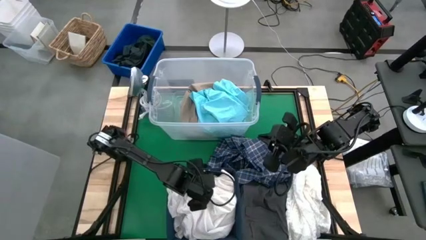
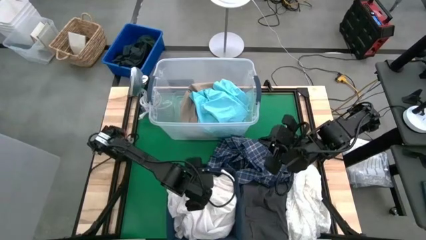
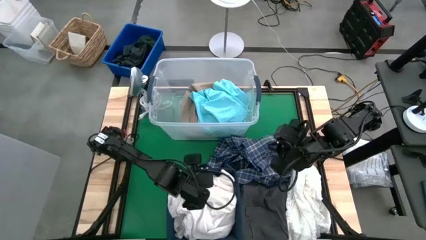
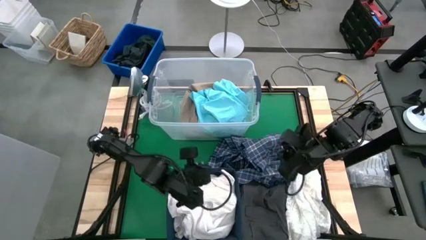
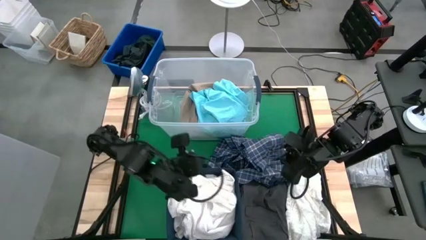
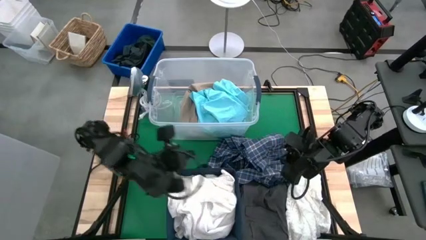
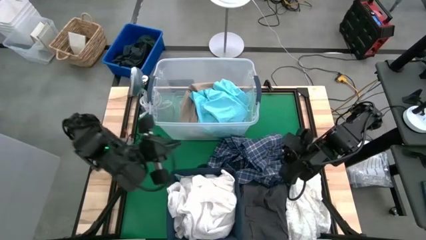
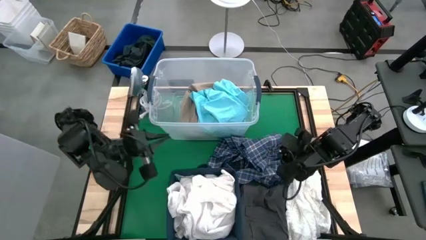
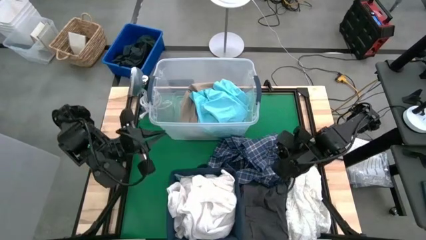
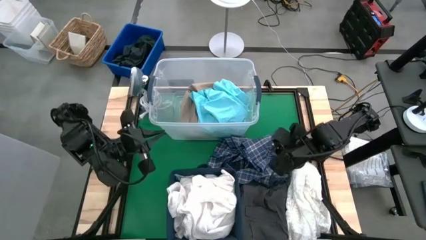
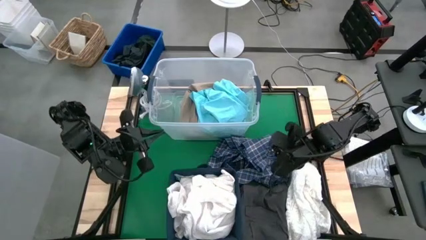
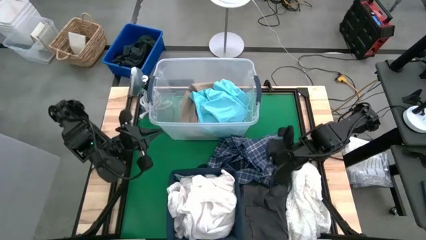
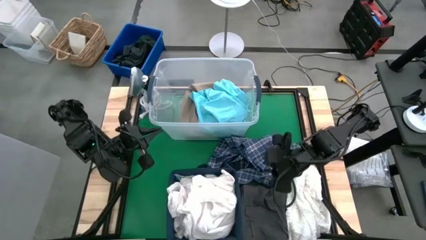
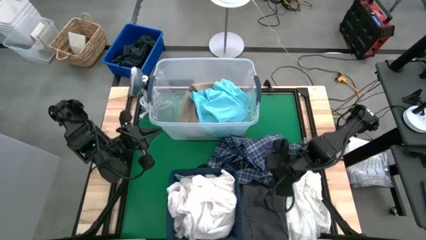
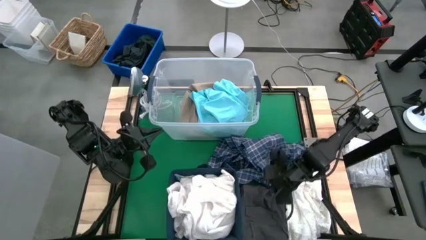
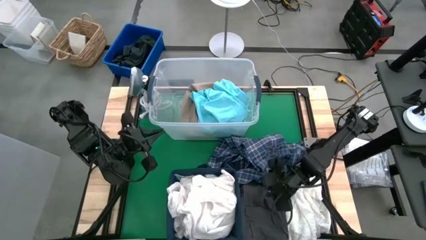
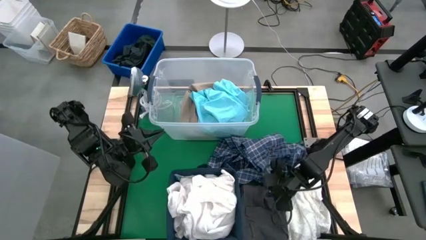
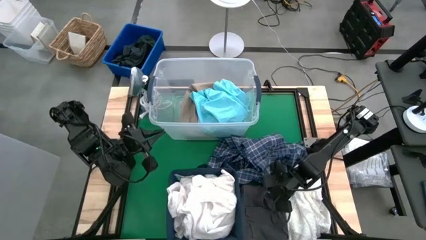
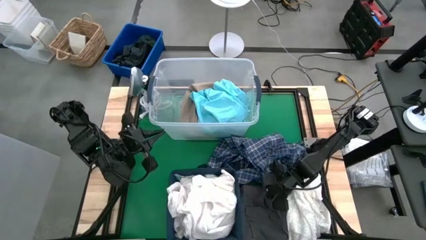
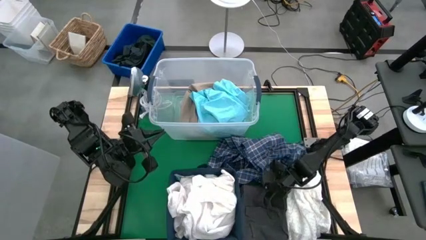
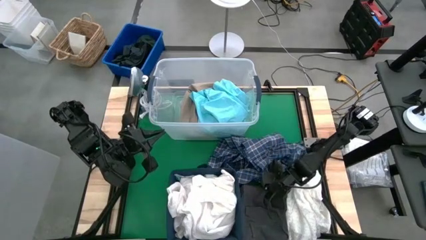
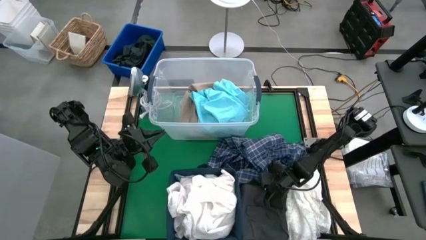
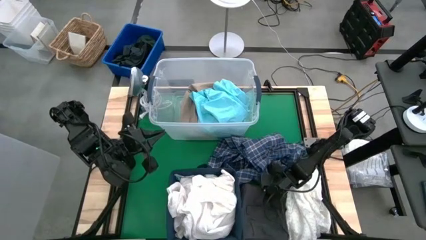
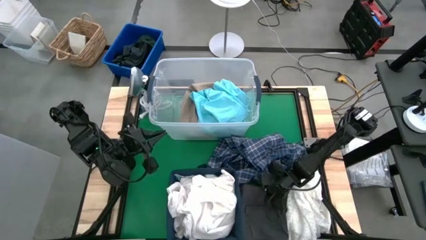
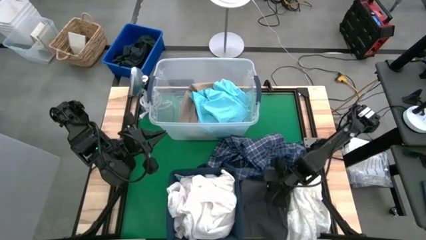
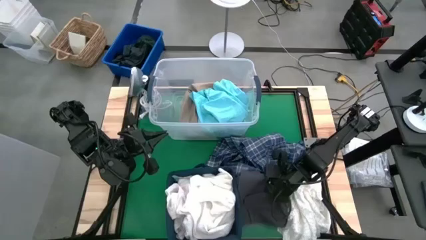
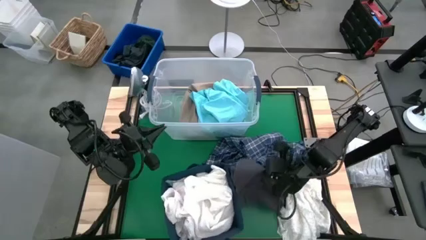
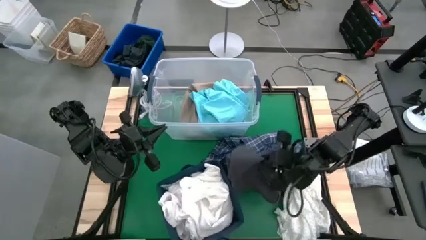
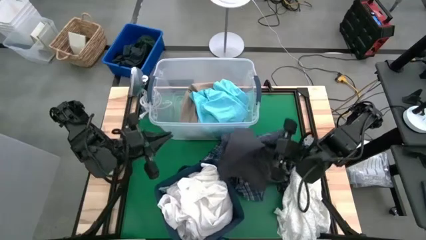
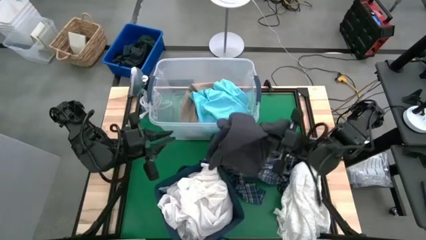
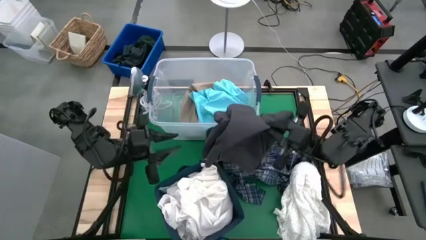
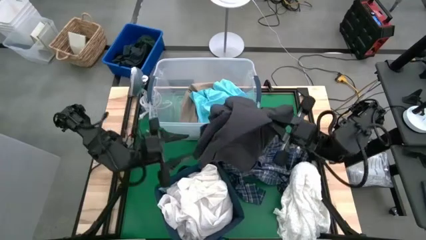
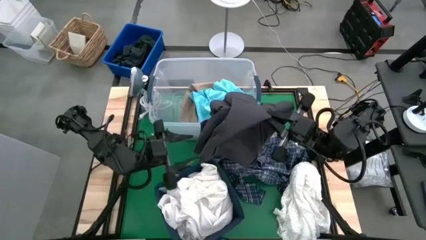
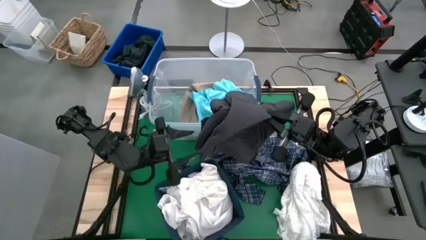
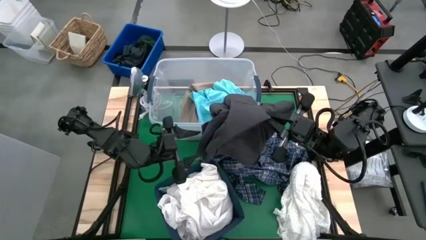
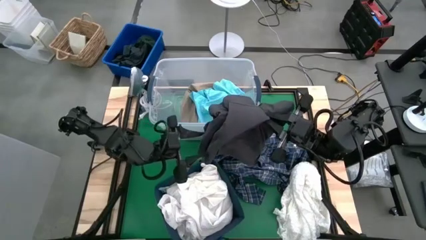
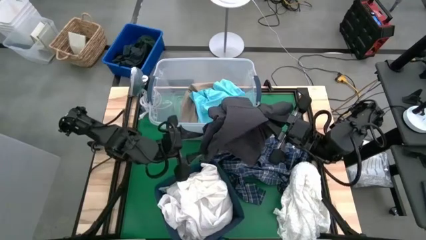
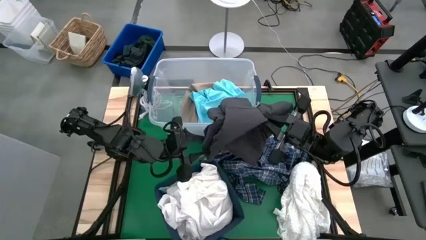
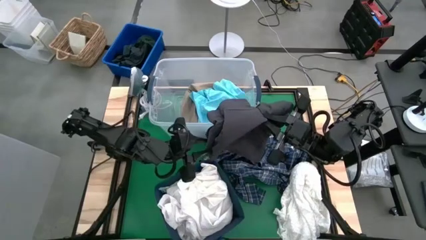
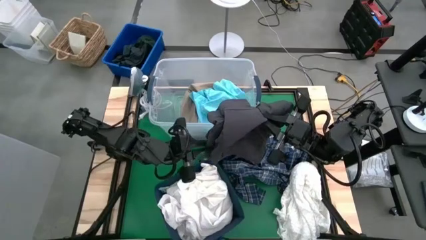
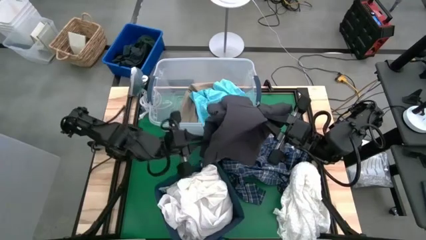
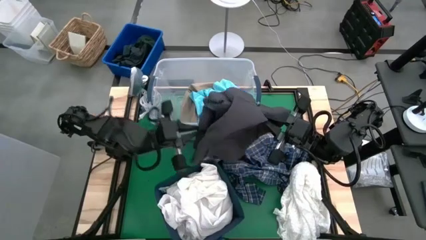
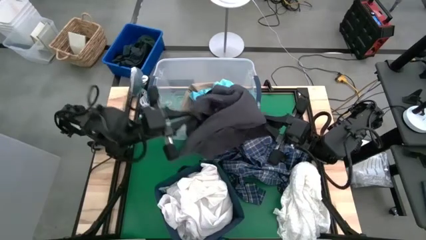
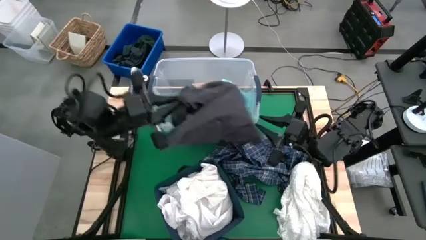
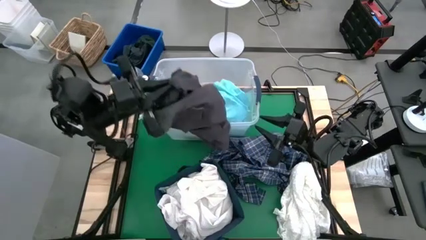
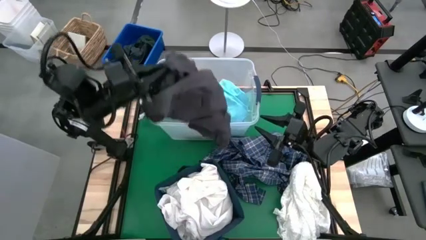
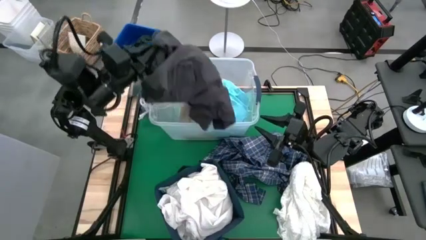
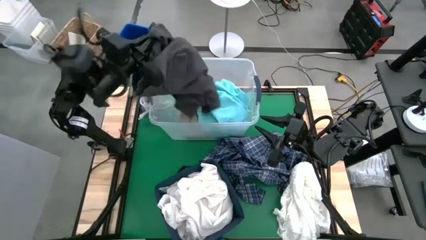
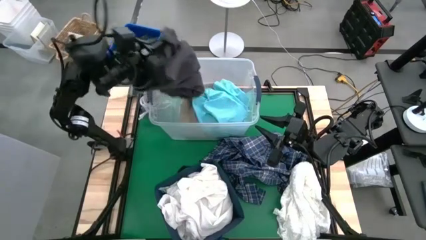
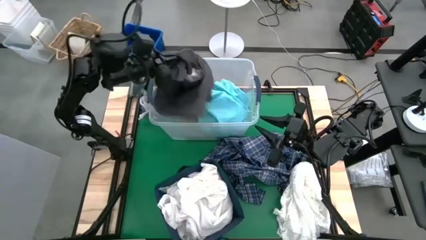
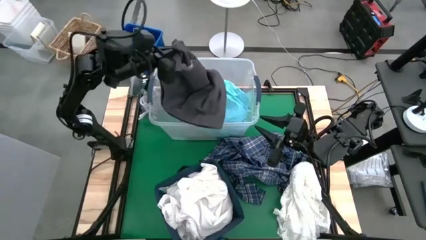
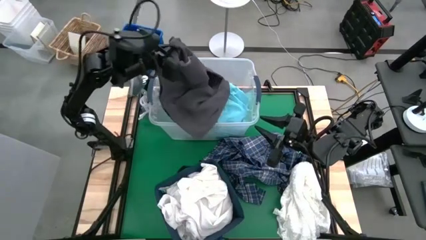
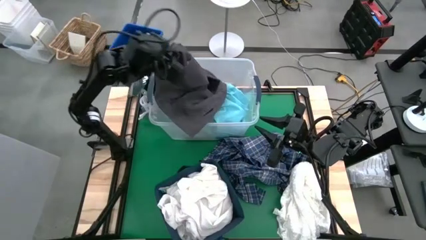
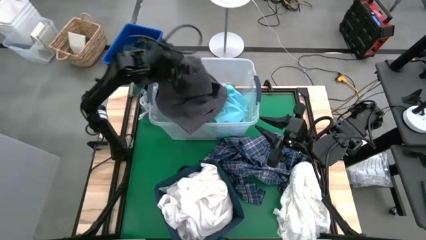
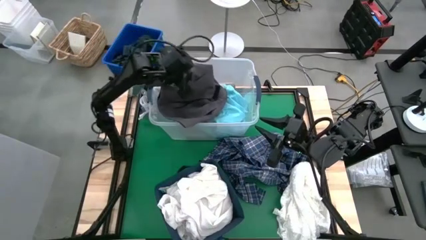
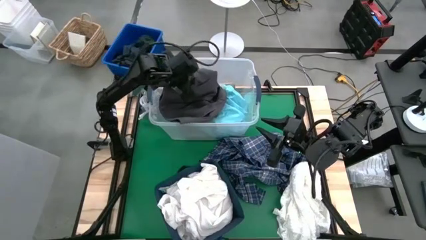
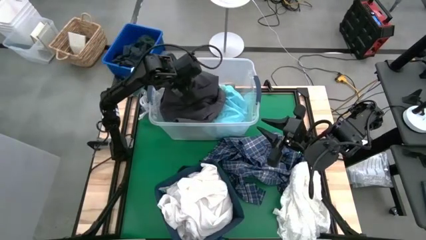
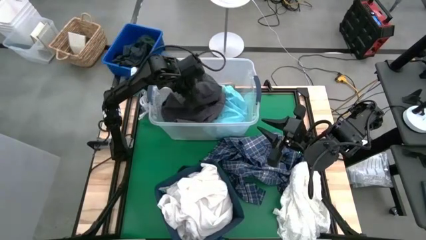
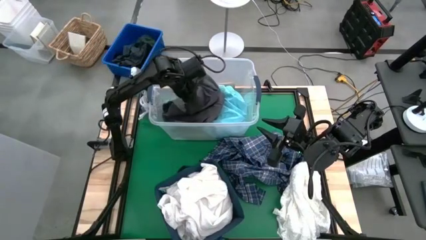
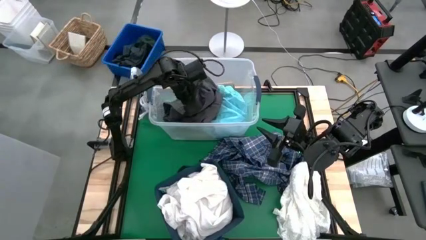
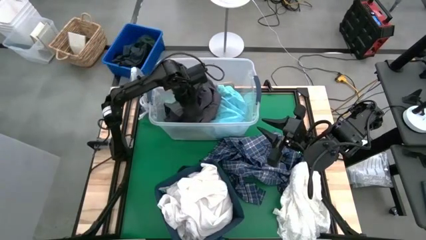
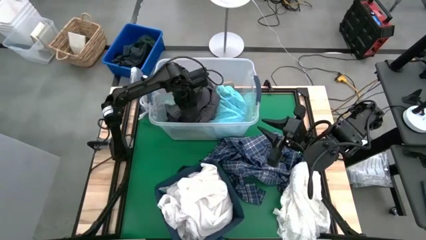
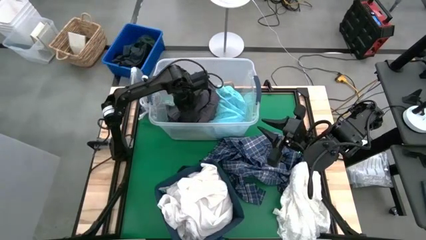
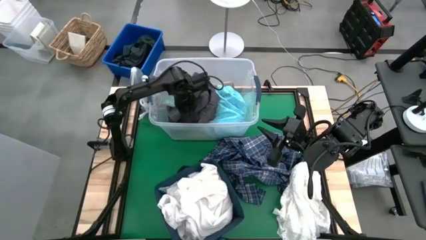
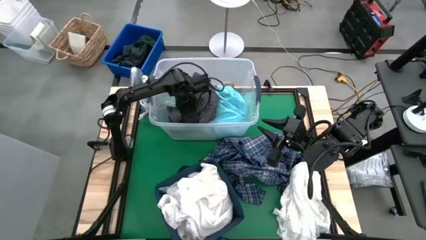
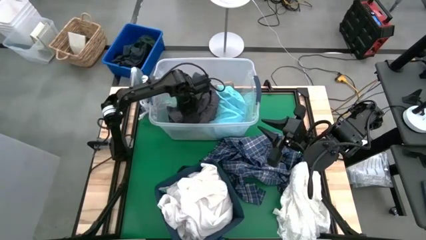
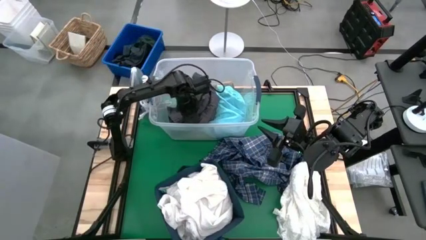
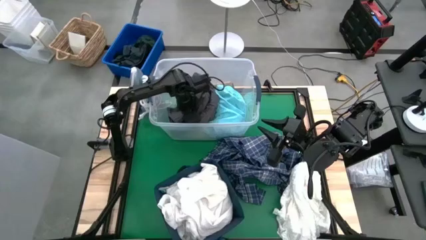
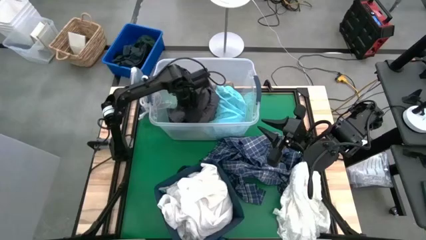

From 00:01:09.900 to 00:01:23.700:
Task: Sort clothes
Put the gray shorts into the transparent laundry bin

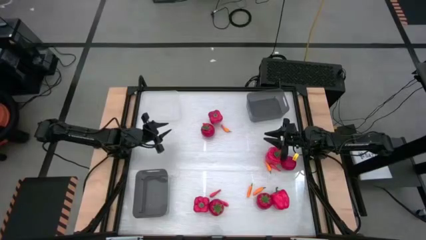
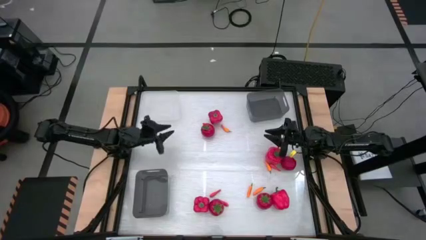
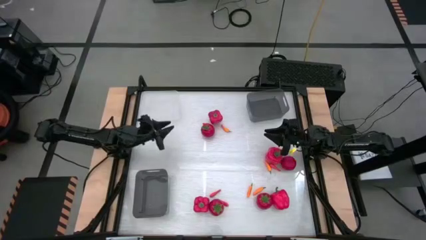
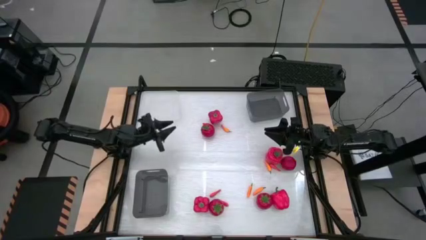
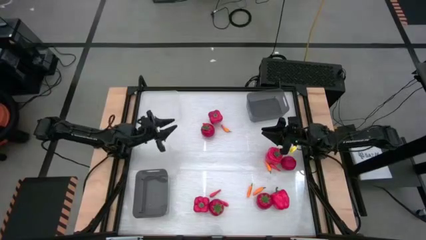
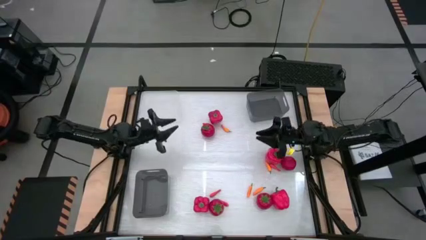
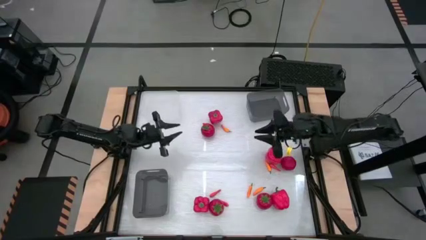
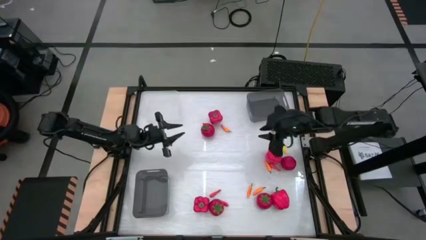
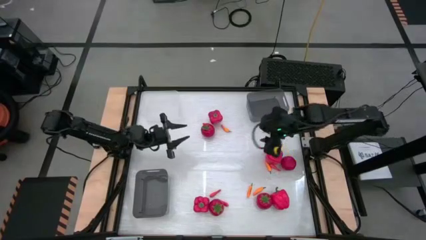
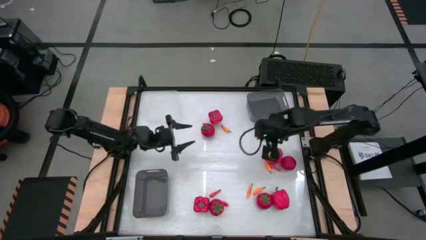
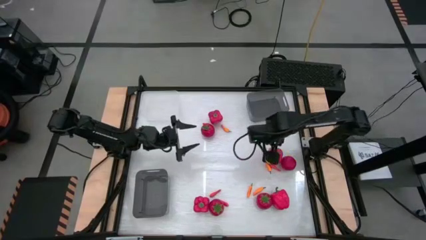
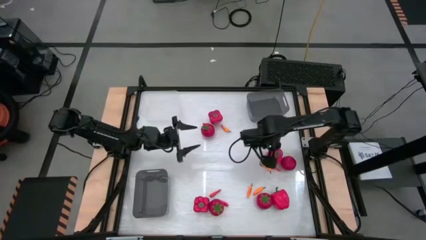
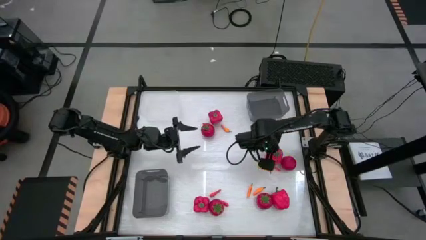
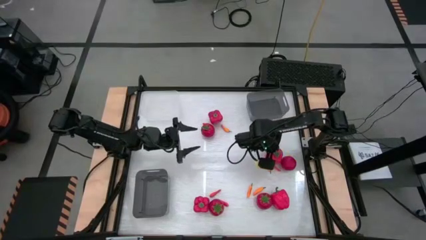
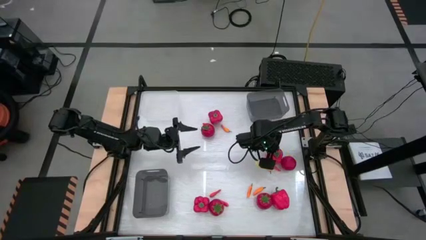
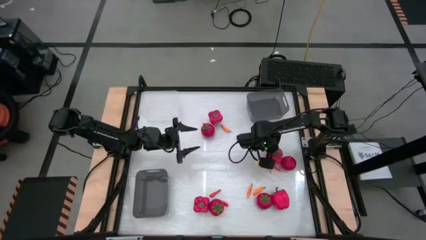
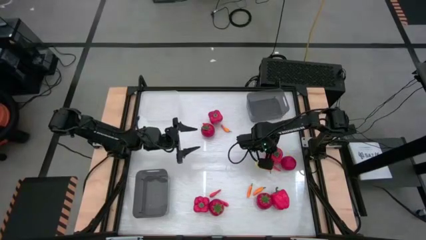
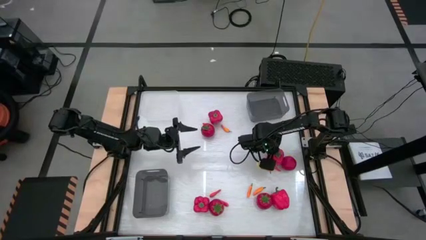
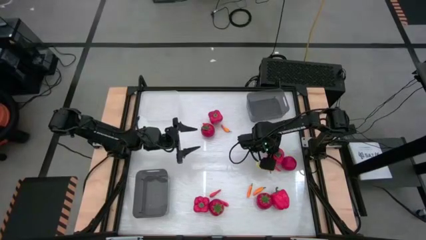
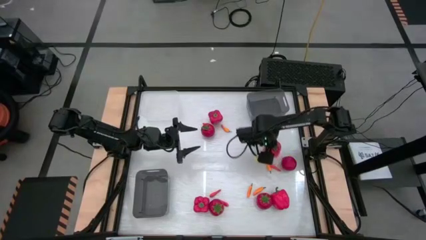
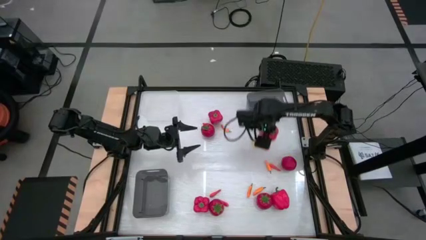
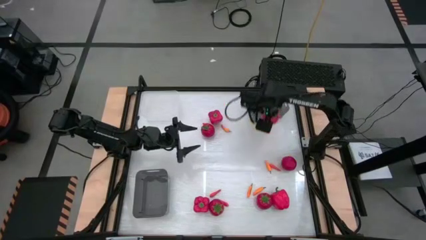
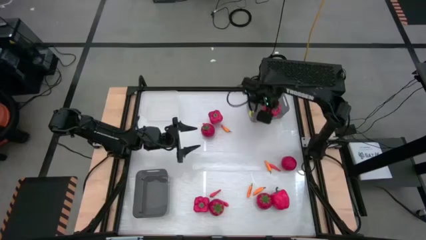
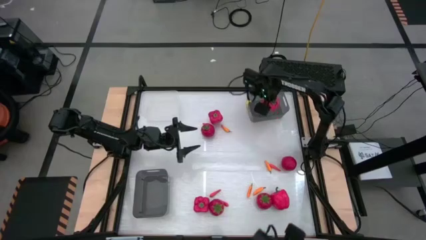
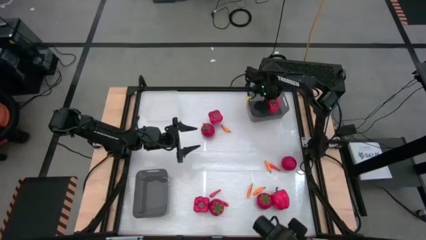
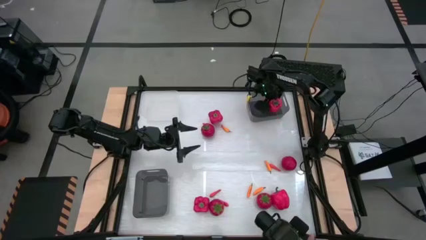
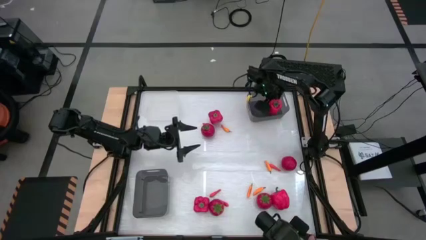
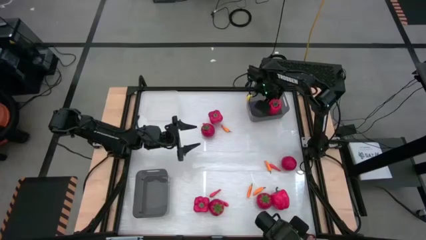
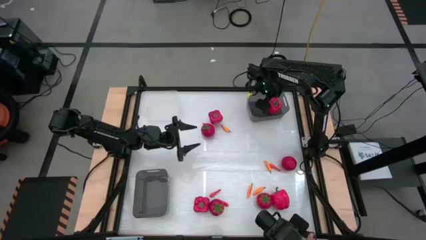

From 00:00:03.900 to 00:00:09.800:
Task: Sort produce into baskets
Put the red bell pepper into the top black bin
